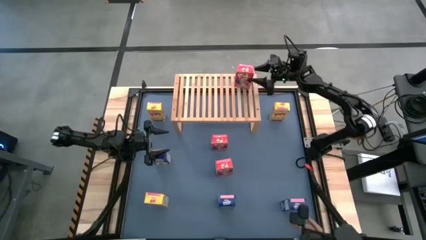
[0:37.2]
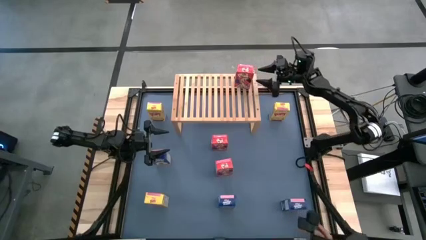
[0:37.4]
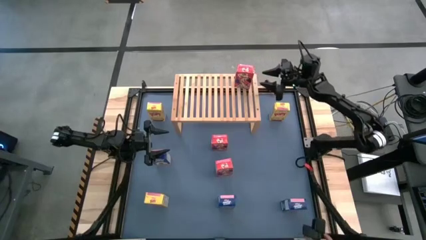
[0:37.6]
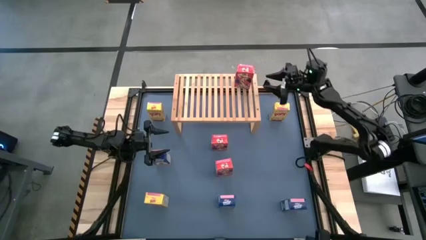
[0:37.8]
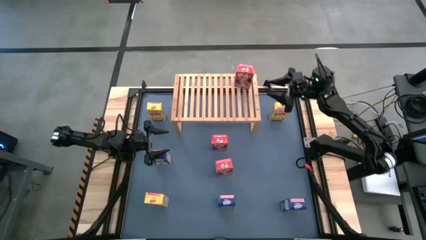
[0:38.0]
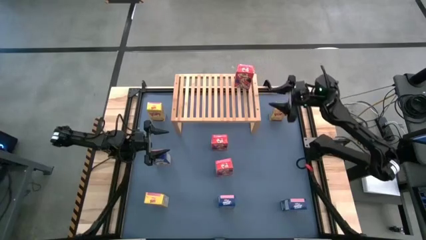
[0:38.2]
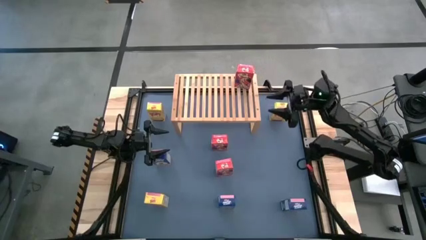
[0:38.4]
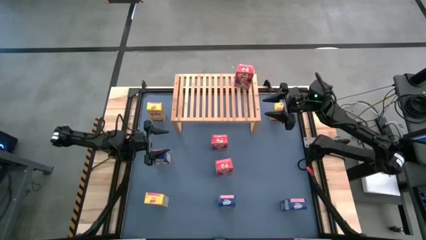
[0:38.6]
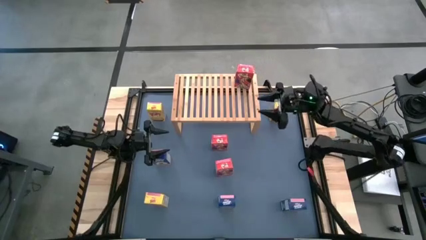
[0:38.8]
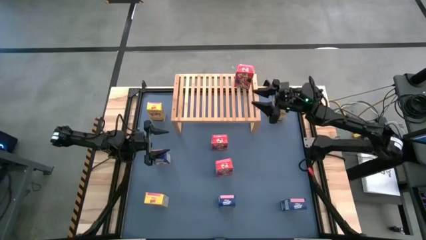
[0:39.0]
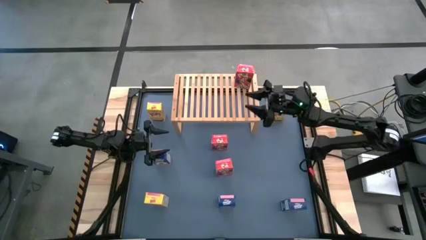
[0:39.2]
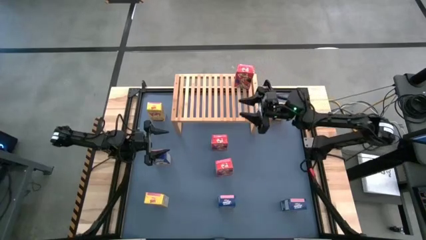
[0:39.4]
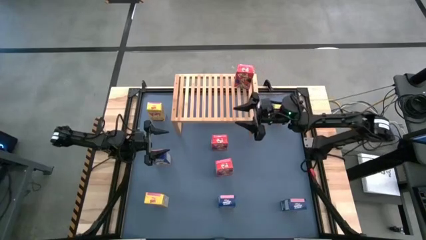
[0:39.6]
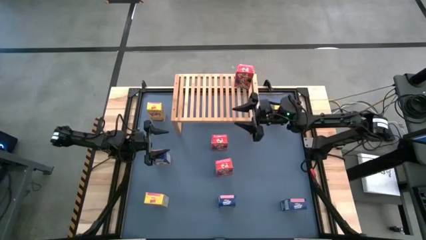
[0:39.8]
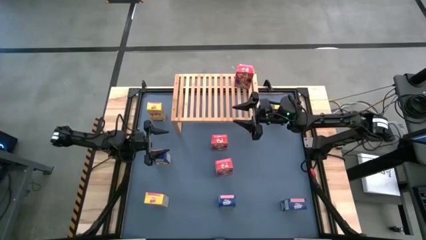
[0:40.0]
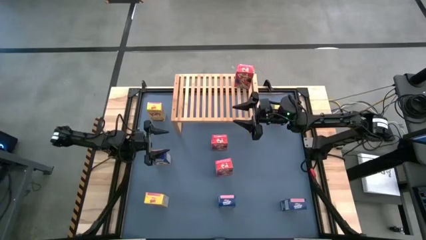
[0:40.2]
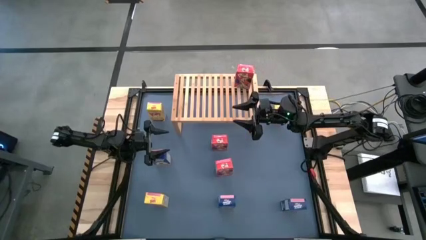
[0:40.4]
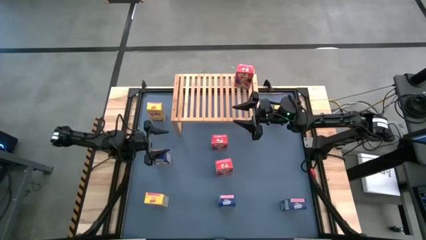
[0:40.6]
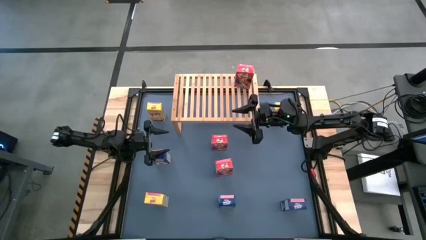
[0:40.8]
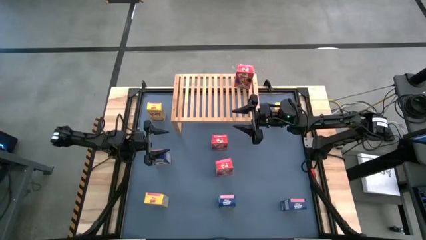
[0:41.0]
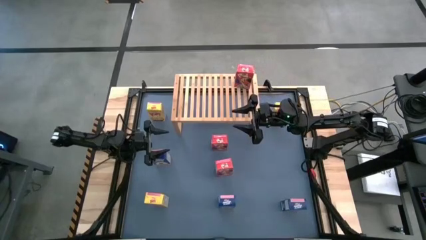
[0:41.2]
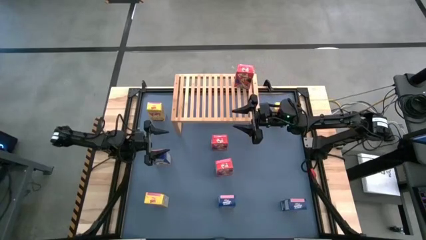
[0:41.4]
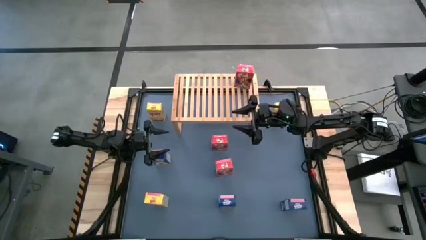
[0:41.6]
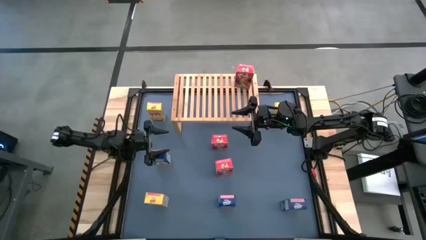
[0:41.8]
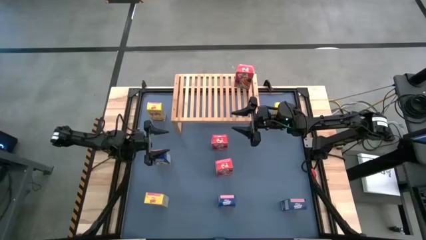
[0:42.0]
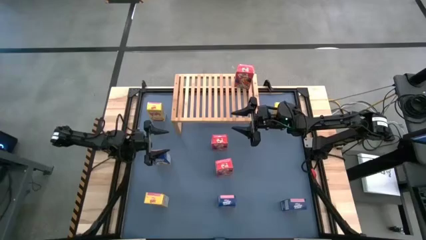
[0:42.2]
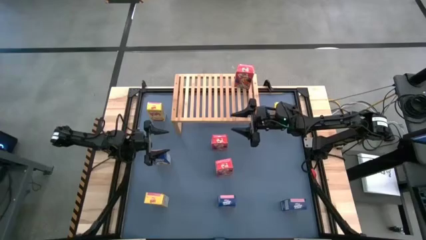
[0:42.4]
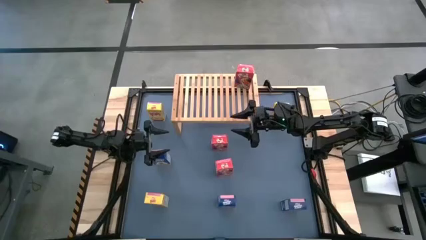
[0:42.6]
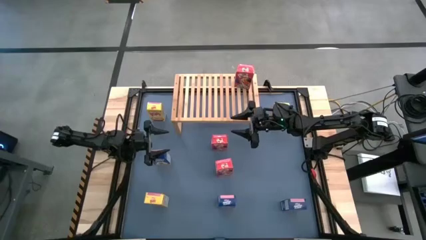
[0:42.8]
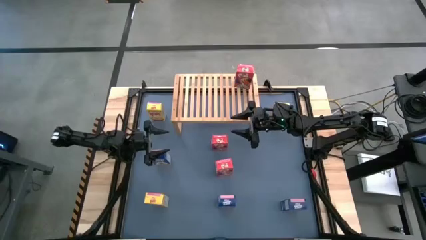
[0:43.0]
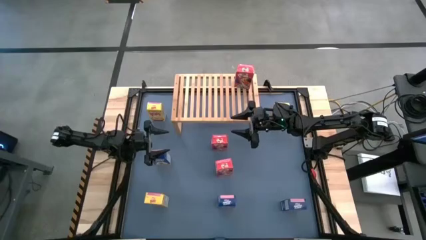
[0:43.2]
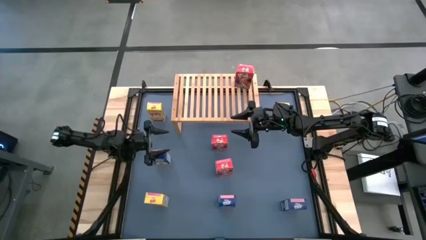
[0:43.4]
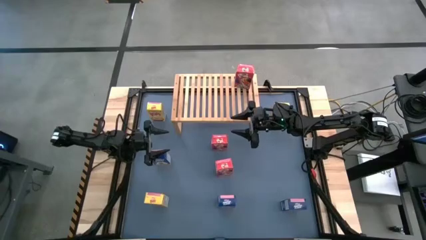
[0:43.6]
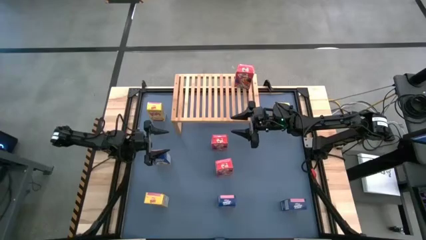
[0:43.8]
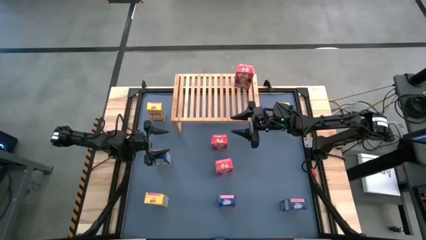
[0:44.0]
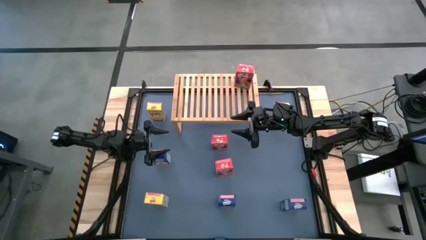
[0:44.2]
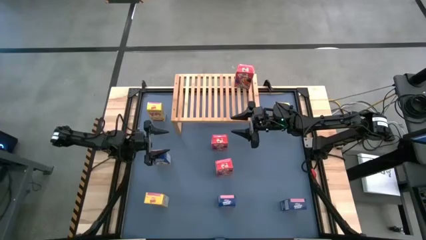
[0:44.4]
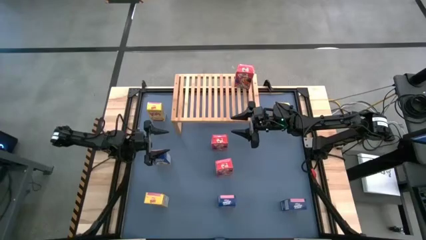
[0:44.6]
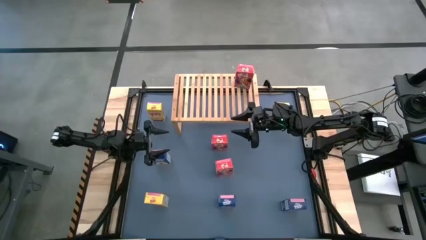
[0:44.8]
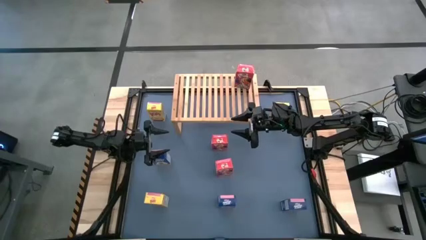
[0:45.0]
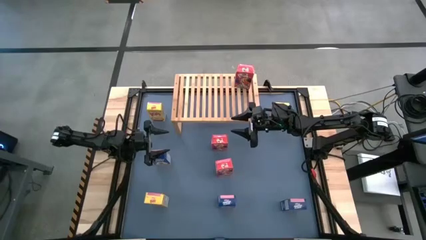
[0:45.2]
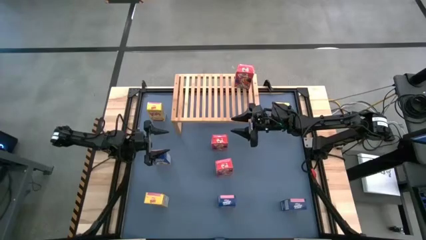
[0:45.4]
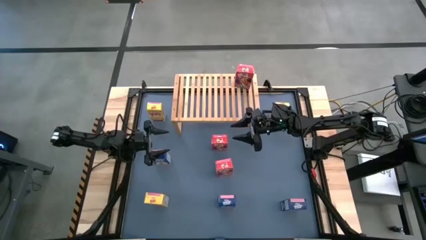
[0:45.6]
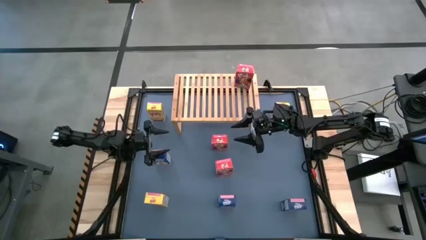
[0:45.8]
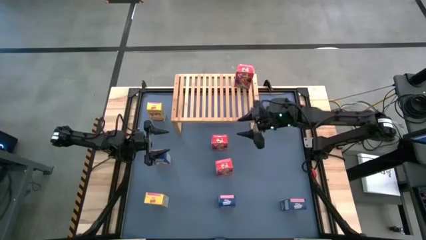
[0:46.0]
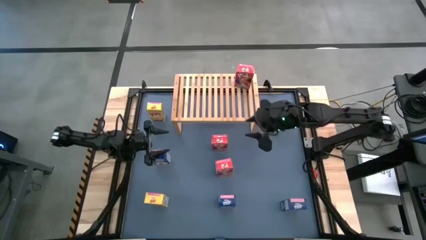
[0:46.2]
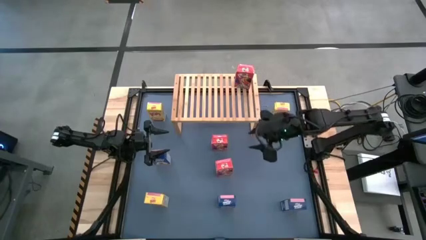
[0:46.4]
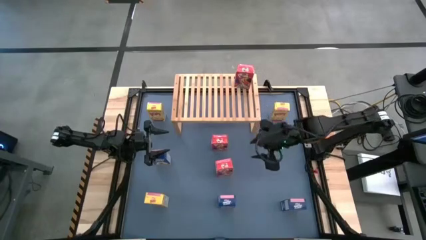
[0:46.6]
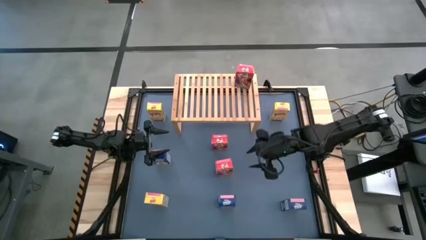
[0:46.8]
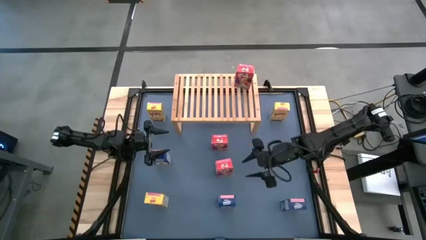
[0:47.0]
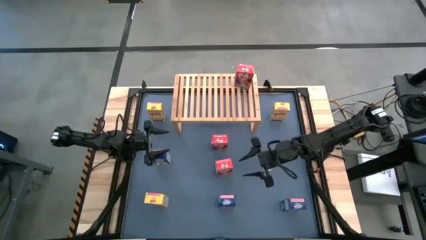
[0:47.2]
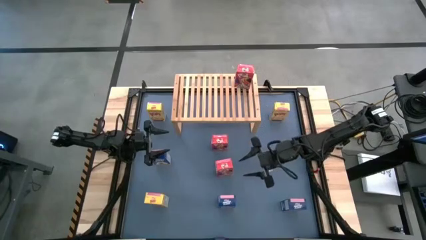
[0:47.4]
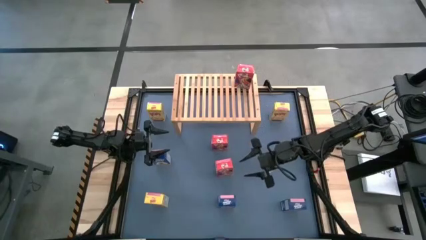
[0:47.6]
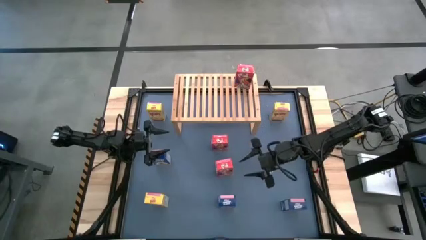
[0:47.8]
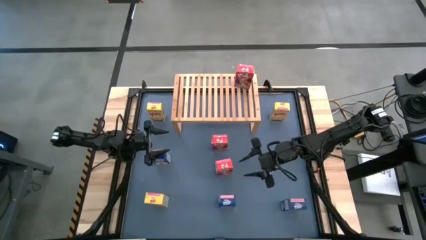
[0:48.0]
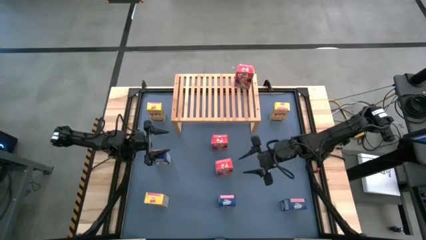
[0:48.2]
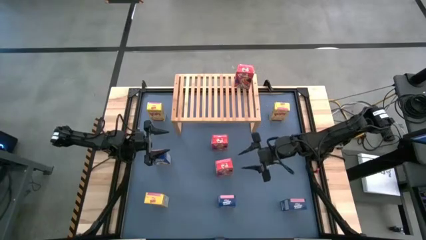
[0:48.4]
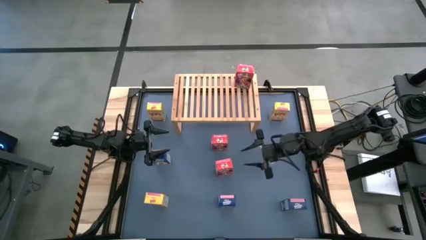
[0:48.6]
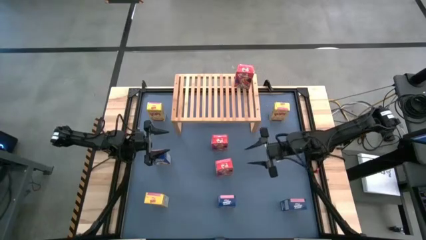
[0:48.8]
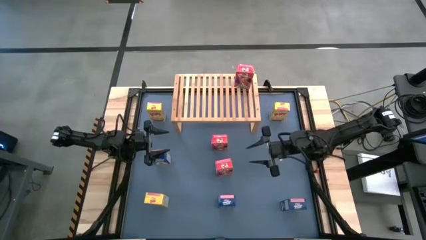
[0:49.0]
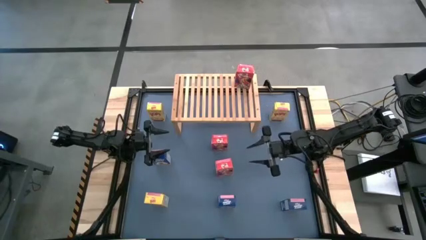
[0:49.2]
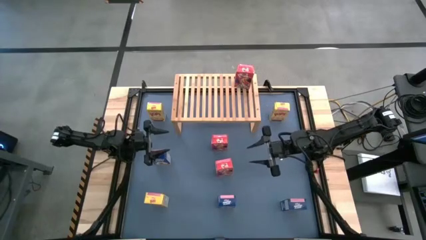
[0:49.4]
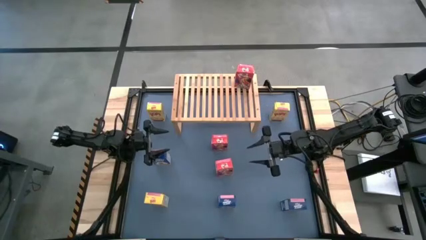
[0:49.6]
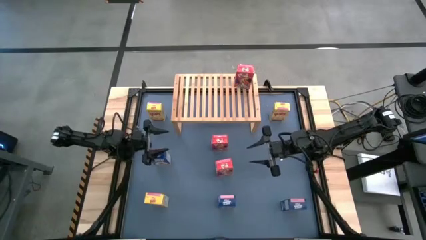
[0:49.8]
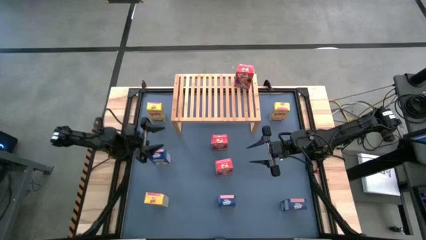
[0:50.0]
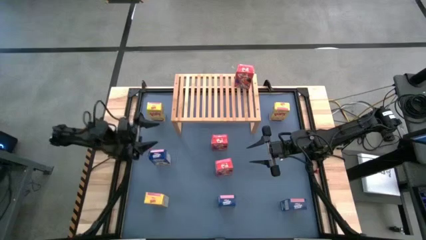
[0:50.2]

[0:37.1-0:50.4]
Task: Stack cereal on shelf
Put the top blue cereal box on the shelf

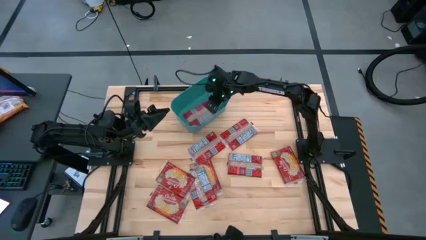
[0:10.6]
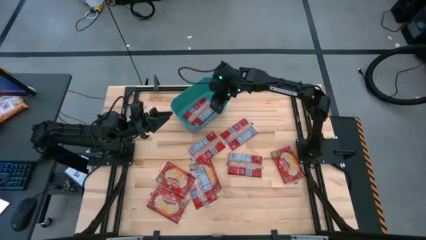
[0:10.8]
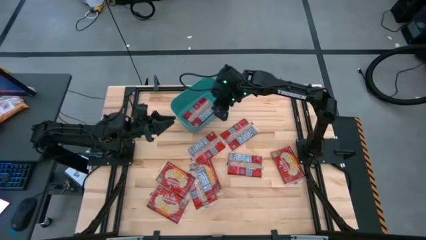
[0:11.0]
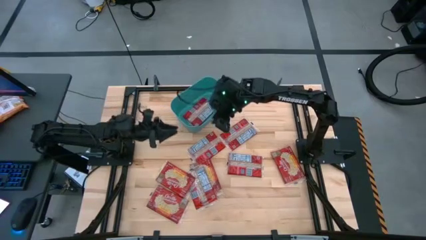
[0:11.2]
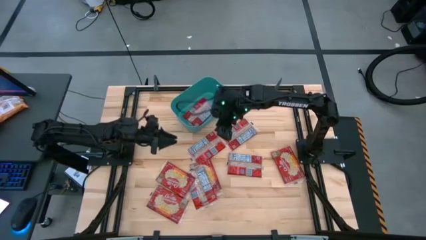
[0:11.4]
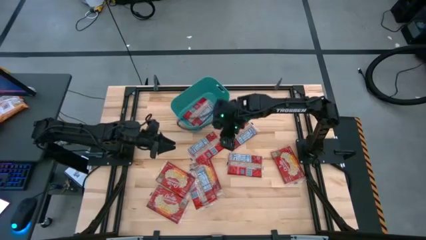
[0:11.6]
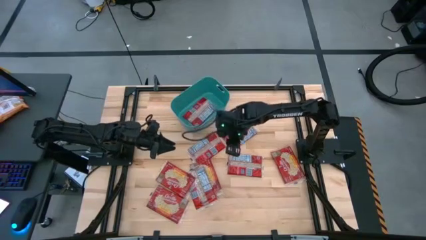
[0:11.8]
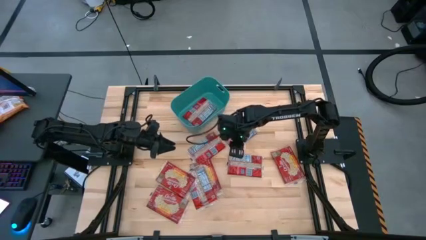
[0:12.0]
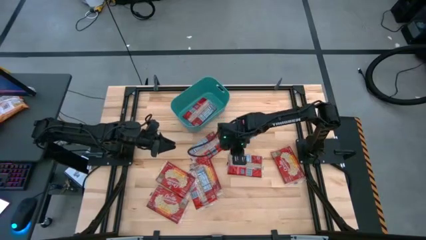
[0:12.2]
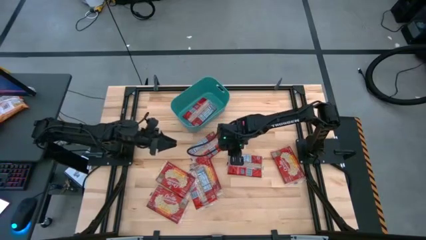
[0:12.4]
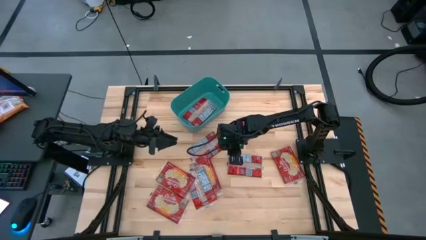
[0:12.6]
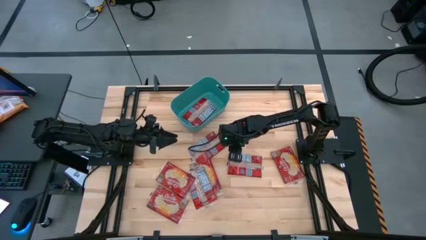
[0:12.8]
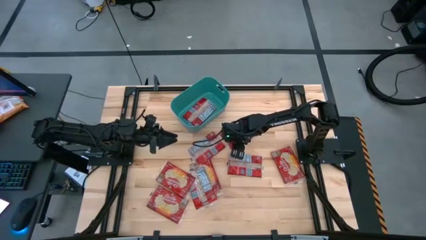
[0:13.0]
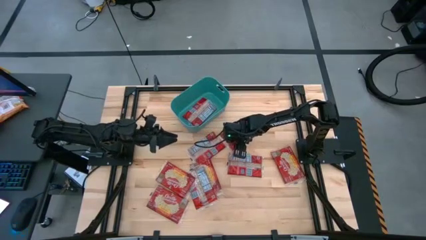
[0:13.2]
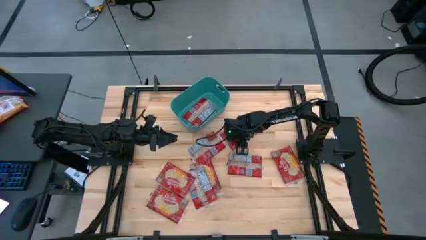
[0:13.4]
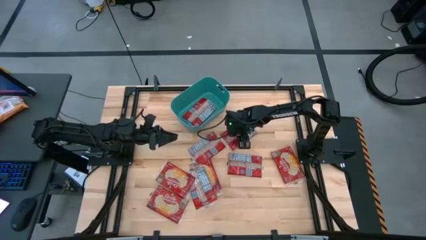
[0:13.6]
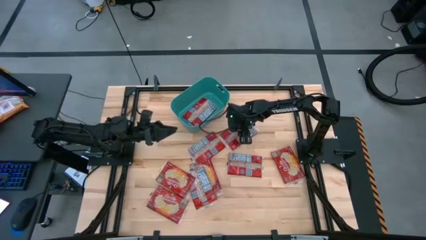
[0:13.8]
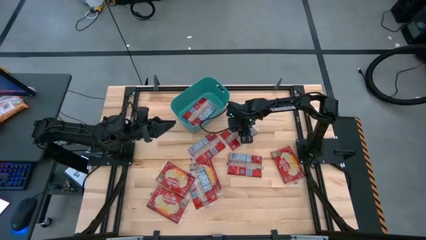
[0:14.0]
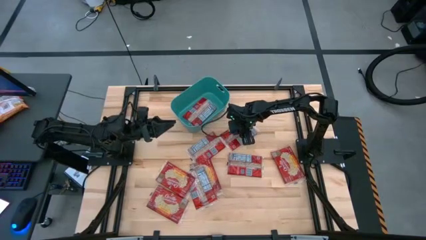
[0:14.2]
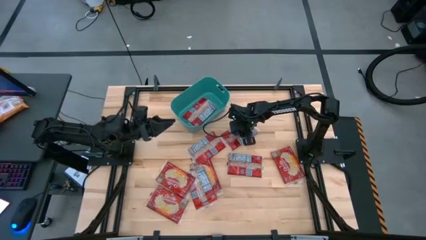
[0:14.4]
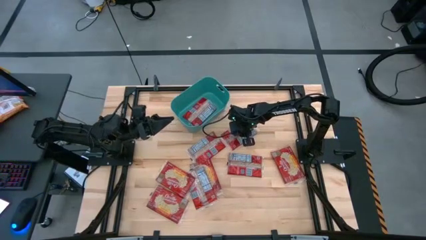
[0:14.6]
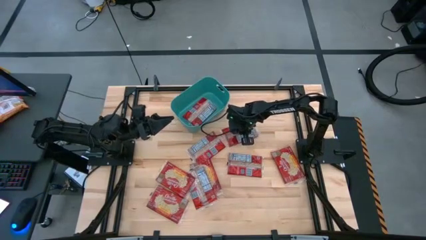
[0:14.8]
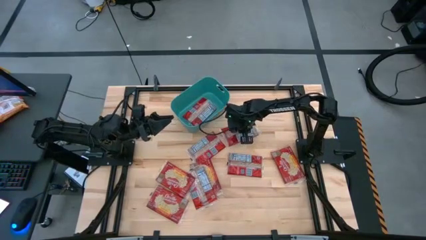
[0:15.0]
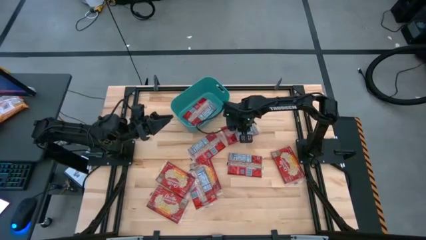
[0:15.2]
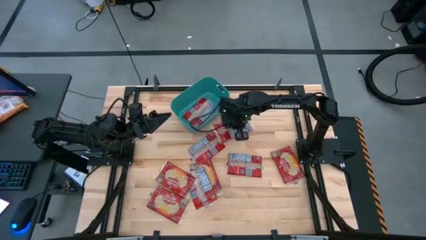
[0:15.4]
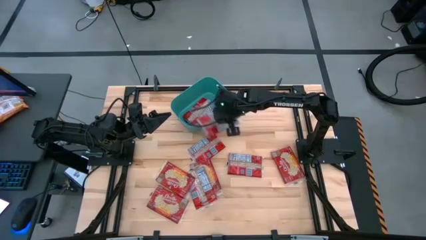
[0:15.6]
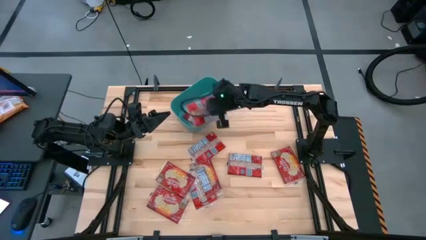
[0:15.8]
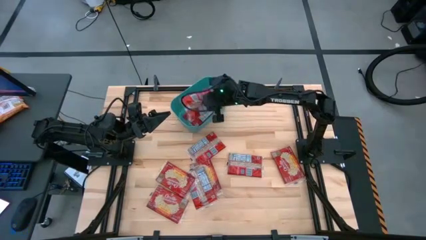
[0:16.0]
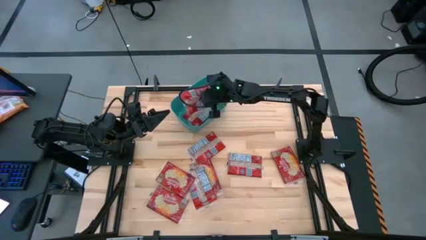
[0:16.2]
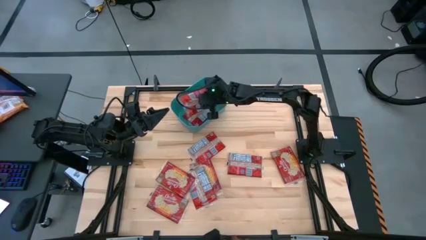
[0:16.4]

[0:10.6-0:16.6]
Task: Sort popcorn bags into baskets
Put the red popcorn bag into the blue bin
